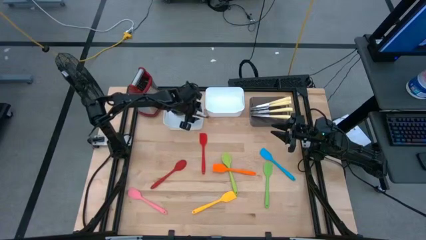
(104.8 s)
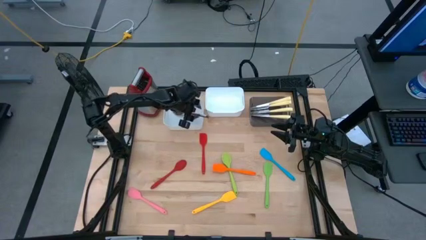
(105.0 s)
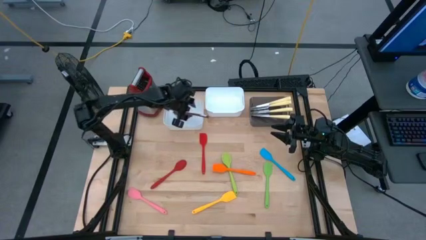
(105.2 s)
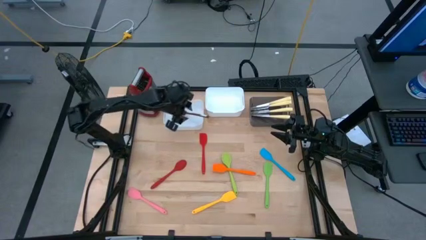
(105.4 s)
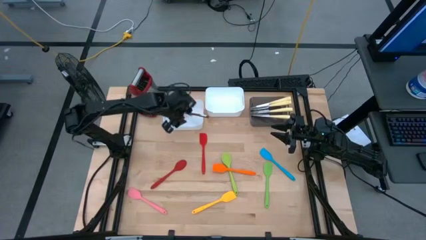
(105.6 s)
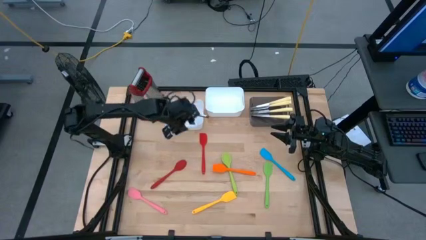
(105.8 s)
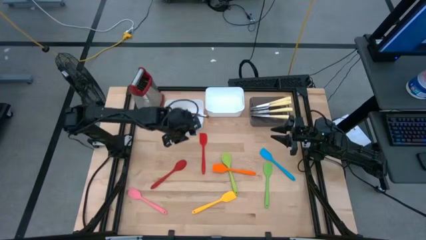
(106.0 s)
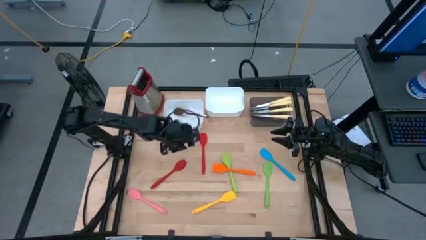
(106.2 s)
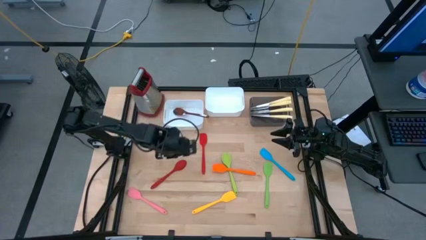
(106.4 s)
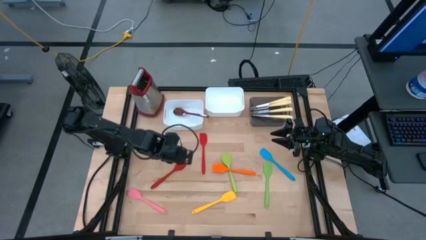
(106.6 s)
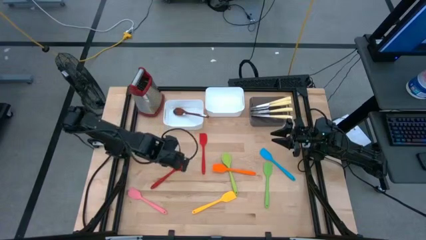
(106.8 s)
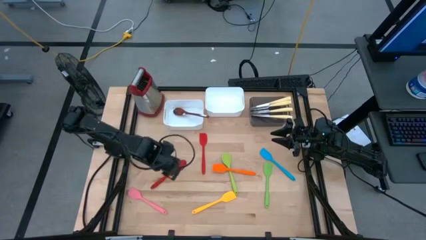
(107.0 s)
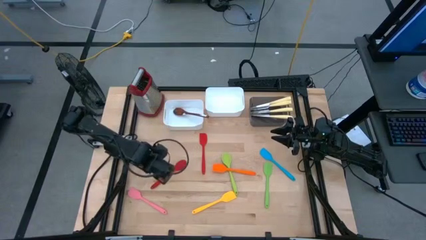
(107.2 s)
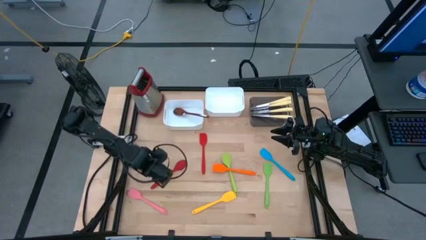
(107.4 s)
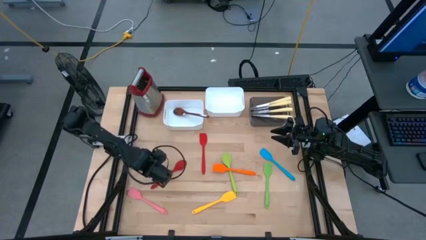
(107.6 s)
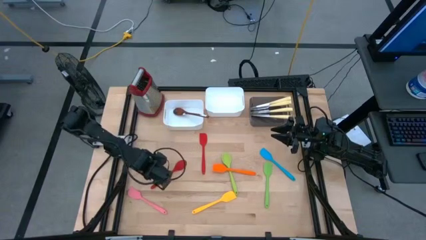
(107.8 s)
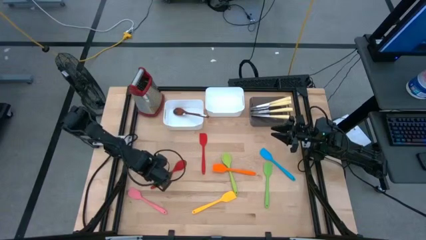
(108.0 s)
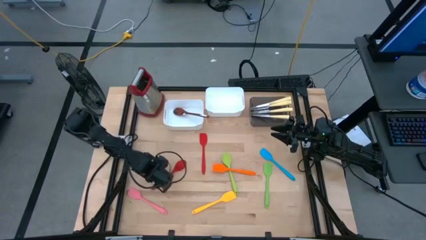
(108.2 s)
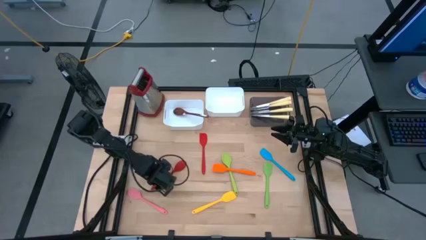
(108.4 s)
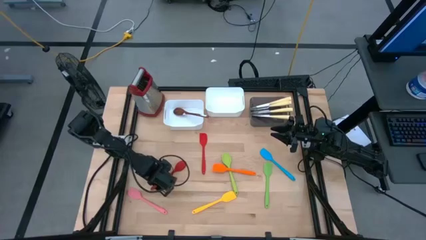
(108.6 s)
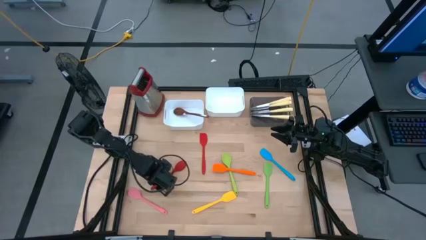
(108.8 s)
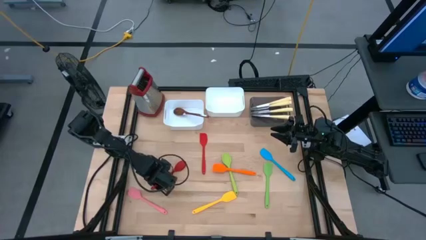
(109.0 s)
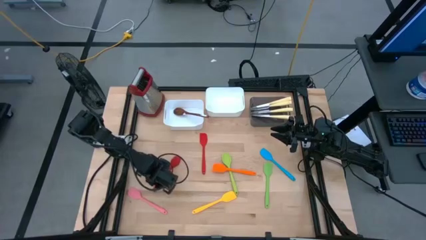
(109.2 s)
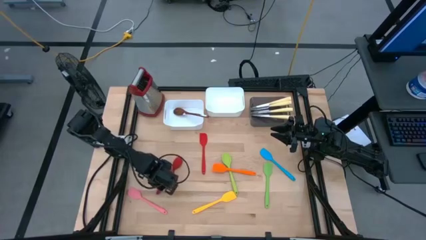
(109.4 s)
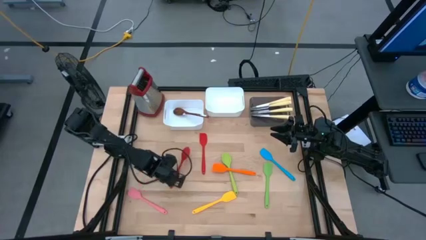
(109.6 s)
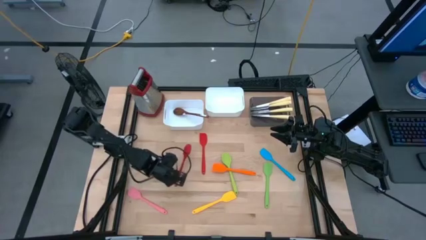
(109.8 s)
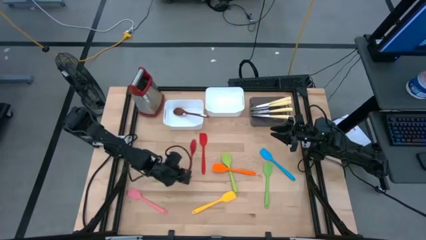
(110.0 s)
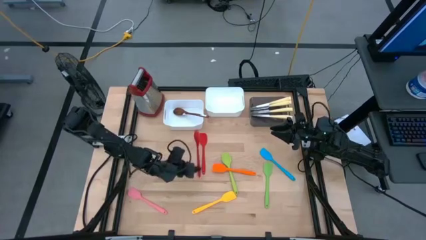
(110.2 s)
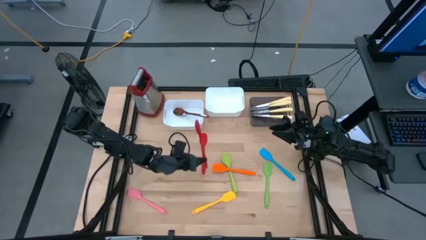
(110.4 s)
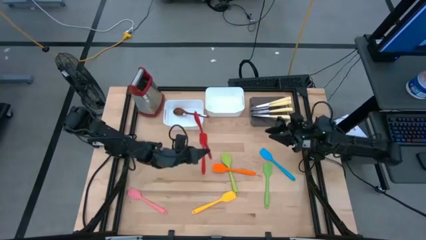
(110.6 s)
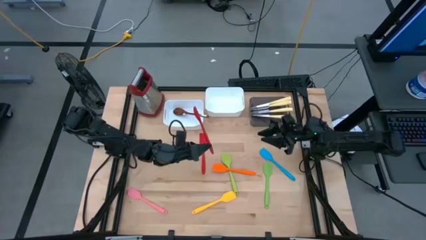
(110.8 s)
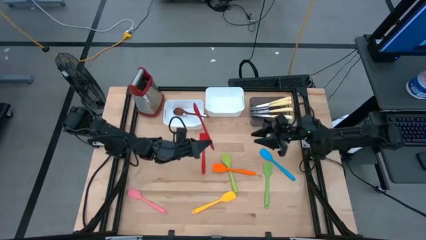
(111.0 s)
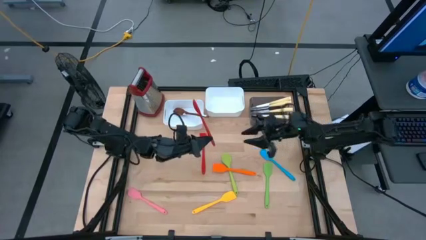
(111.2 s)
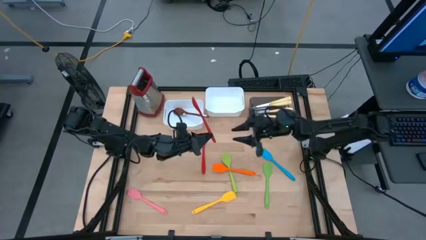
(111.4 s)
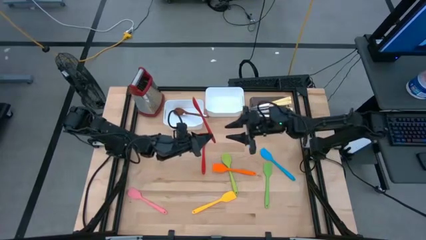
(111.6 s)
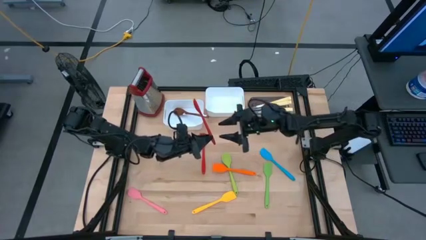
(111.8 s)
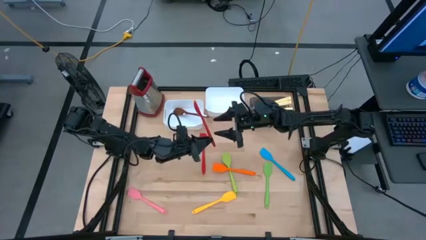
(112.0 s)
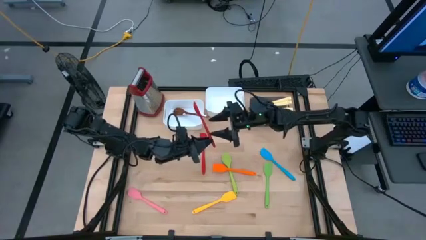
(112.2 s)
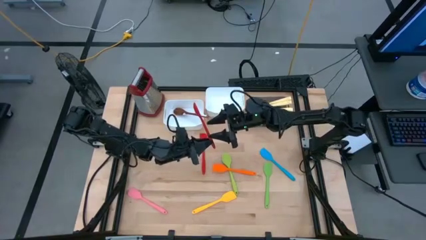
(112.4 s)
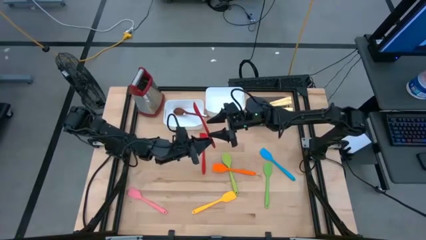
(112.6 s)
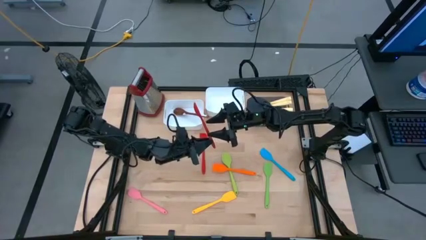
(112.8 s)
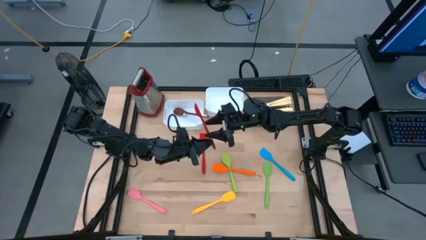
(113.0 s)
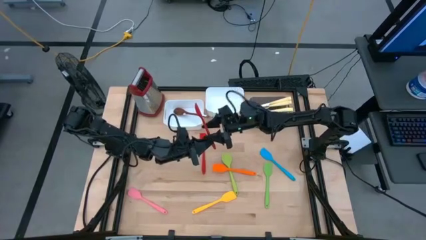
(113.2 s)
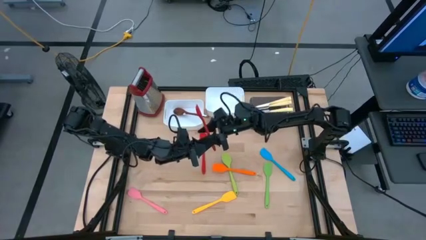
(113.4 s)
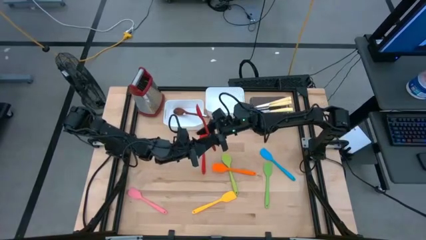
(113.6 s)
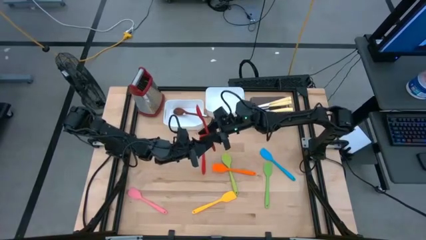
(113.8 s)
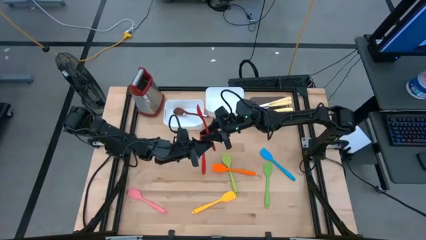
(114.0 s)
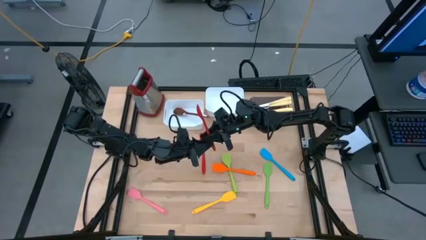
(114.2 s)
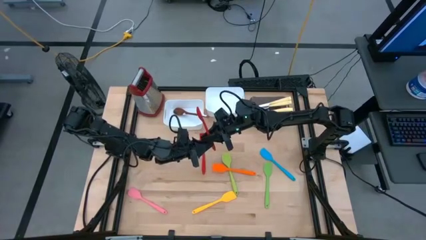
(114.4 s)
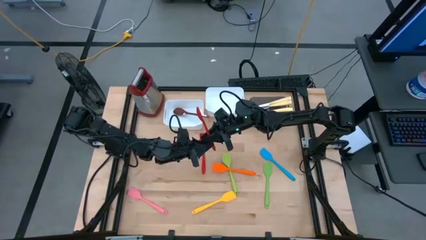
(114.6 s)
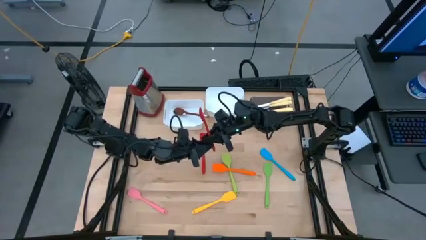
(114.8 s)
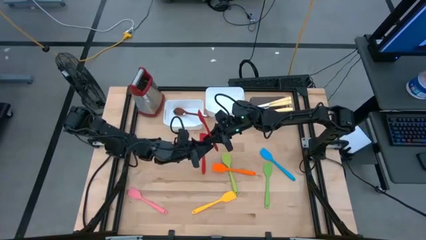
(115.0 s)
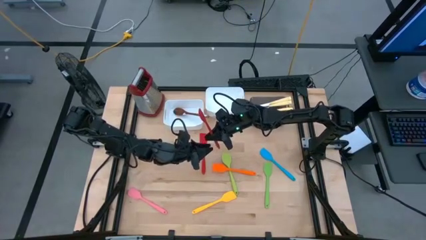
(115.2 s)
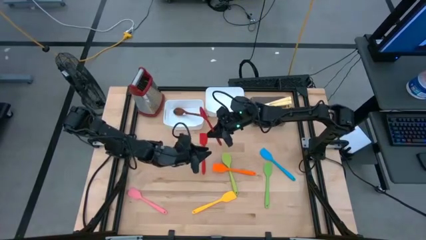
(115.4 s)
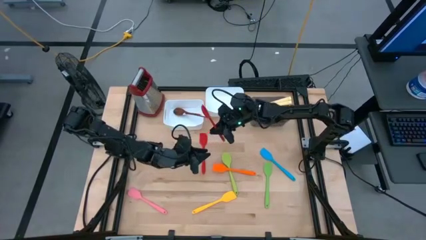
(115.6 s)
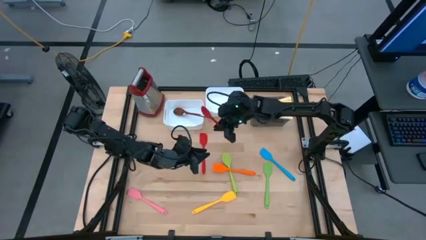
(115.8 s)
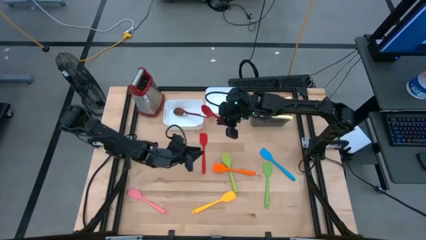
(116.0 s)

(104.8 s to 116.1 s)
Task: Pick & Place Kitchen Items
Put the red serving spoon into the left white bin
